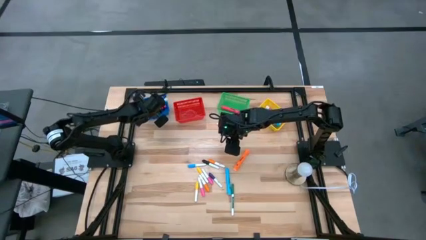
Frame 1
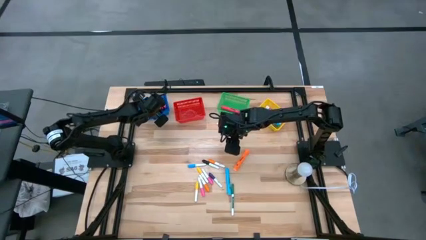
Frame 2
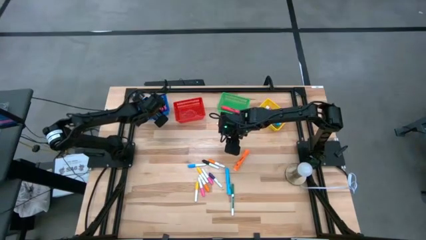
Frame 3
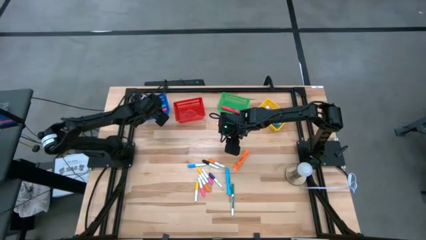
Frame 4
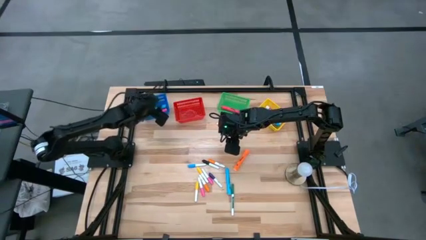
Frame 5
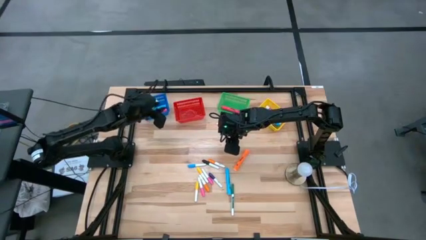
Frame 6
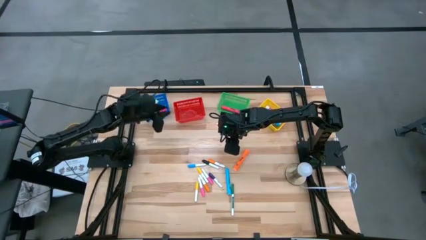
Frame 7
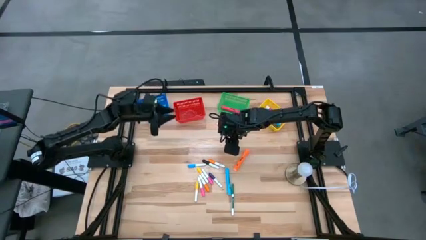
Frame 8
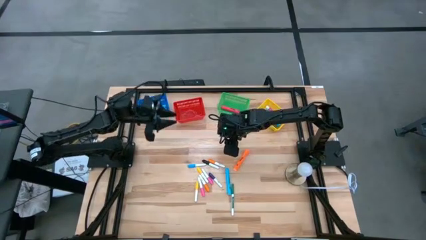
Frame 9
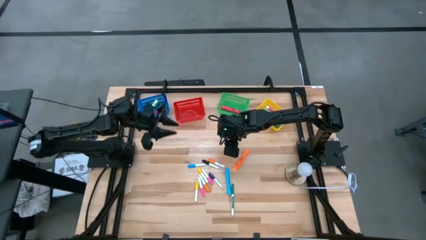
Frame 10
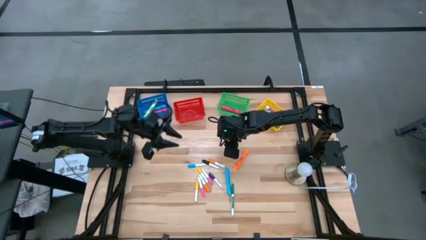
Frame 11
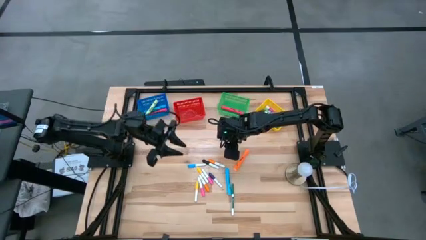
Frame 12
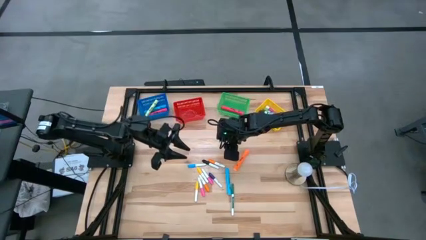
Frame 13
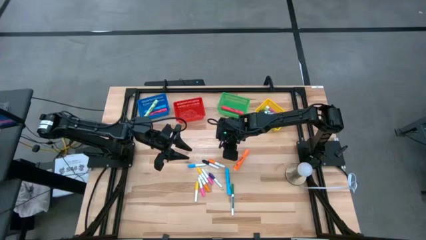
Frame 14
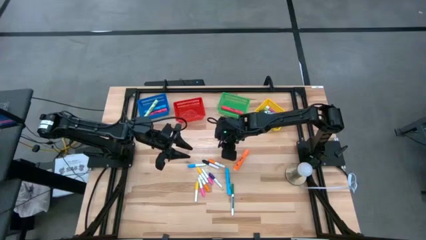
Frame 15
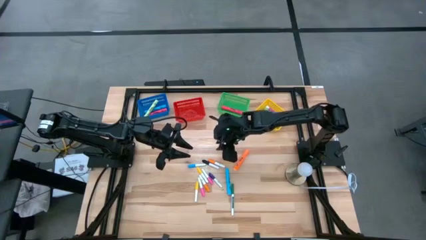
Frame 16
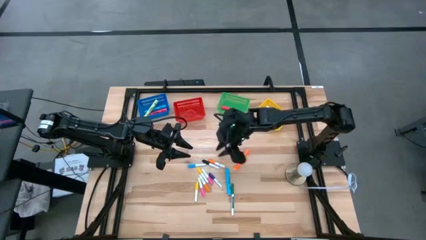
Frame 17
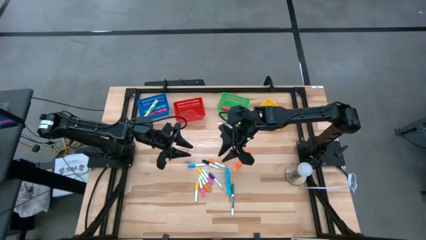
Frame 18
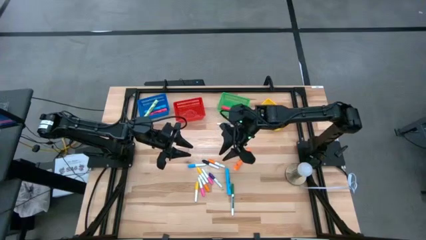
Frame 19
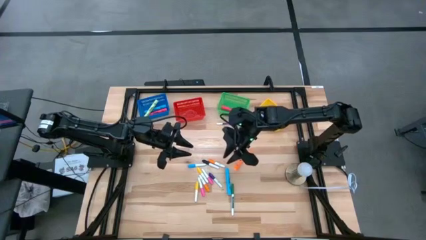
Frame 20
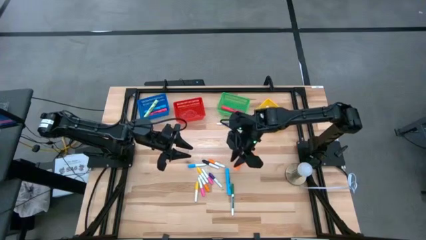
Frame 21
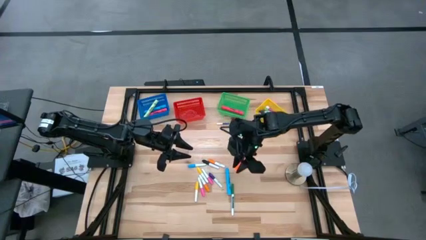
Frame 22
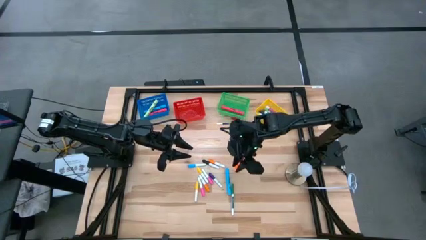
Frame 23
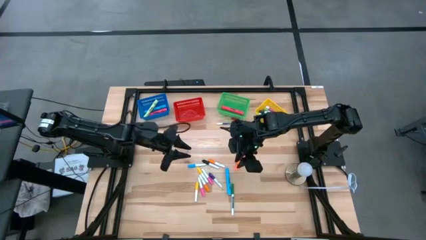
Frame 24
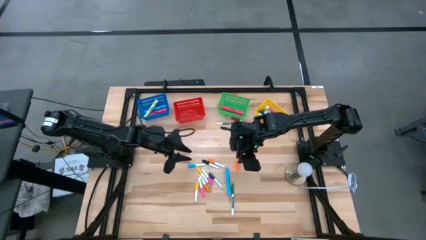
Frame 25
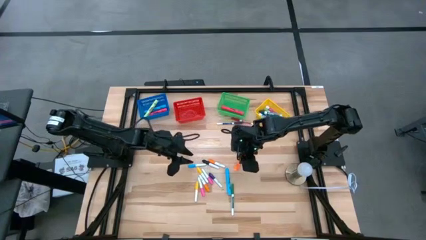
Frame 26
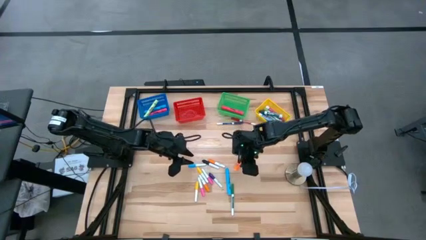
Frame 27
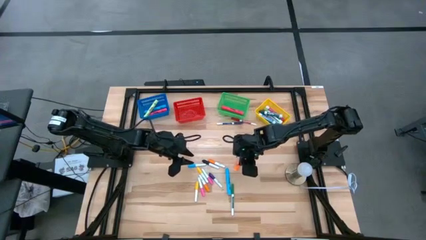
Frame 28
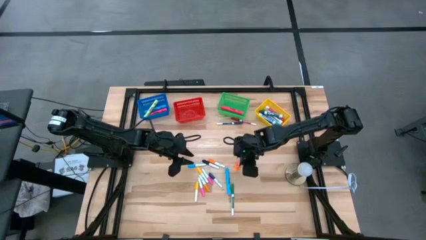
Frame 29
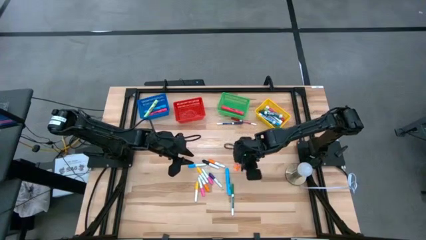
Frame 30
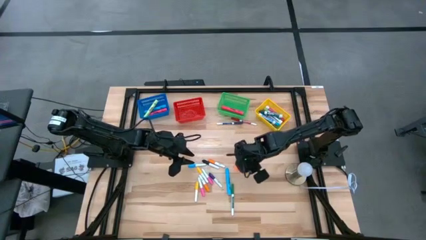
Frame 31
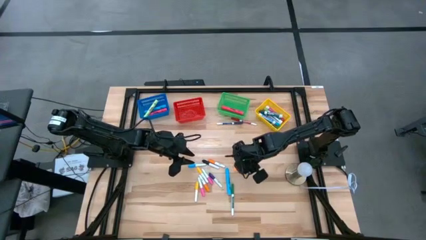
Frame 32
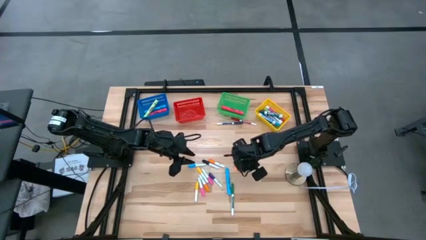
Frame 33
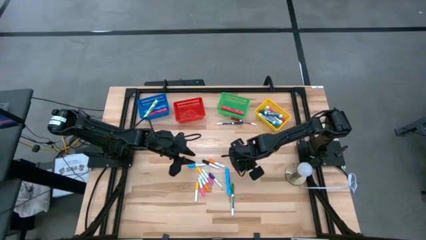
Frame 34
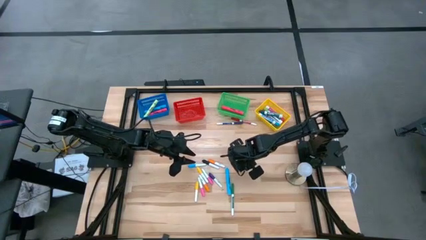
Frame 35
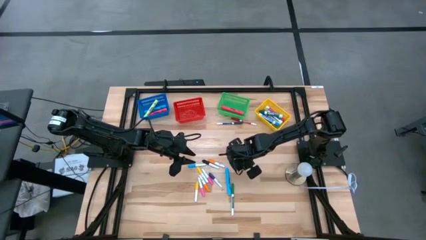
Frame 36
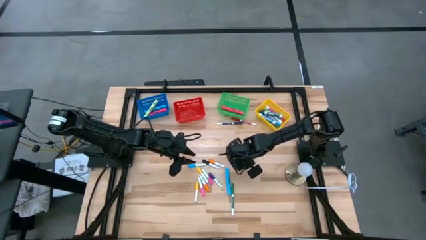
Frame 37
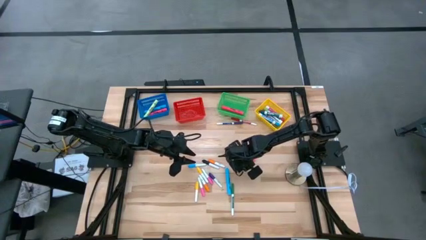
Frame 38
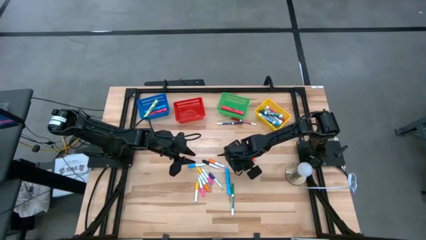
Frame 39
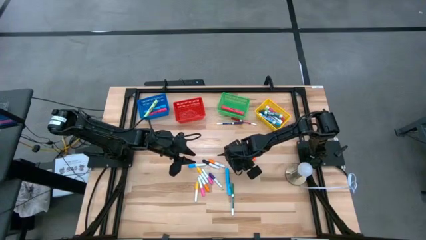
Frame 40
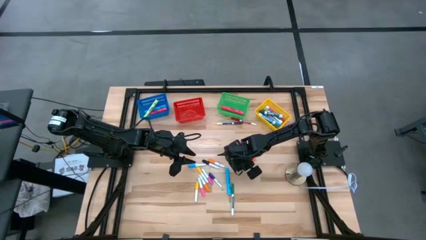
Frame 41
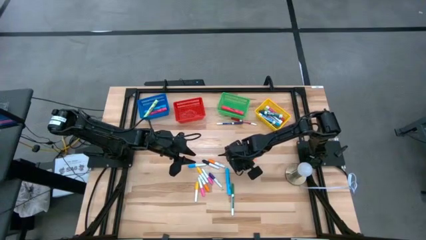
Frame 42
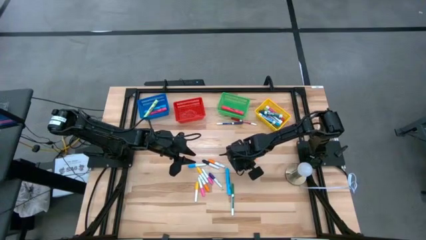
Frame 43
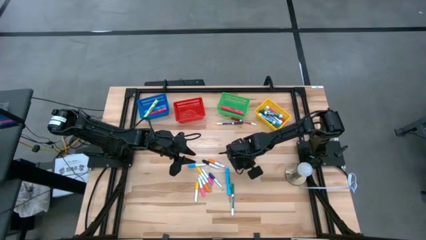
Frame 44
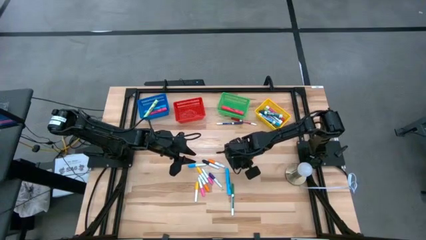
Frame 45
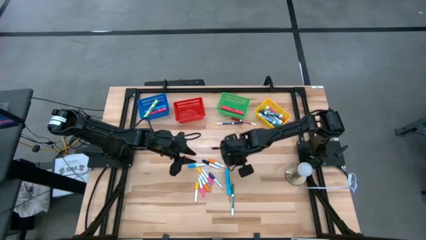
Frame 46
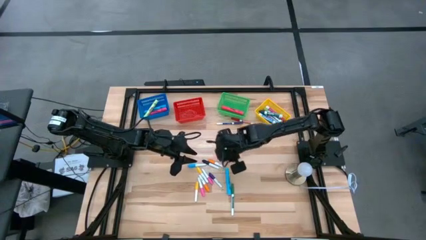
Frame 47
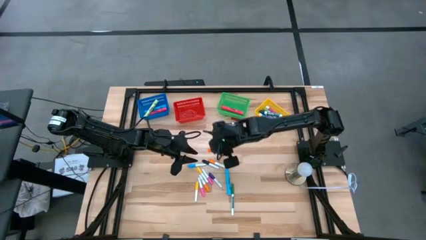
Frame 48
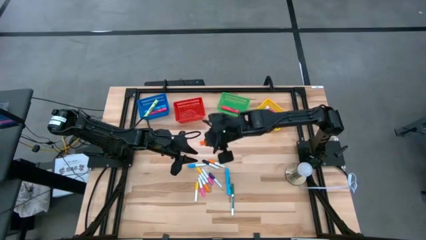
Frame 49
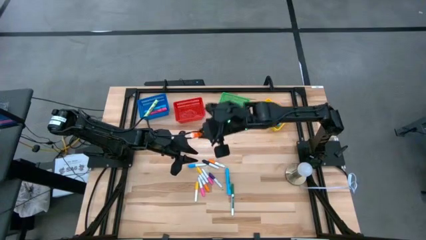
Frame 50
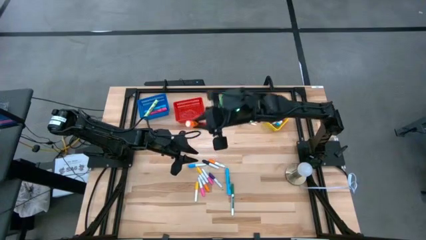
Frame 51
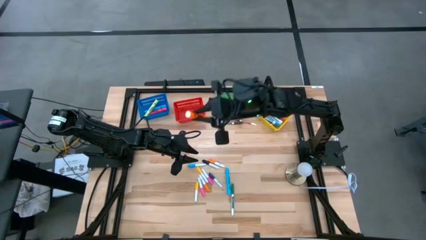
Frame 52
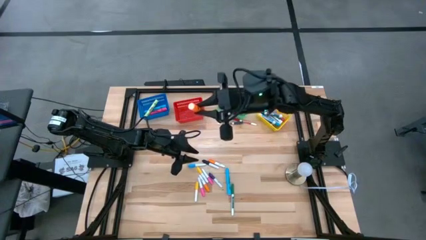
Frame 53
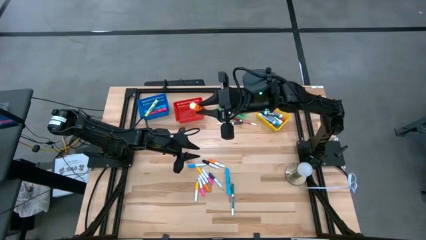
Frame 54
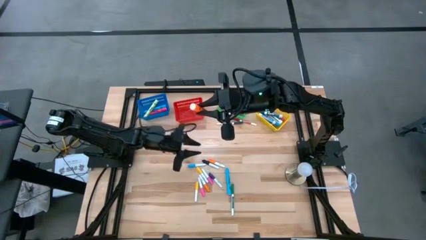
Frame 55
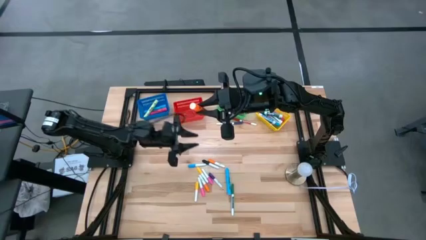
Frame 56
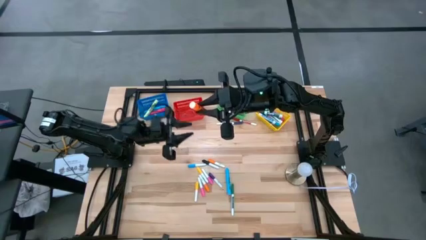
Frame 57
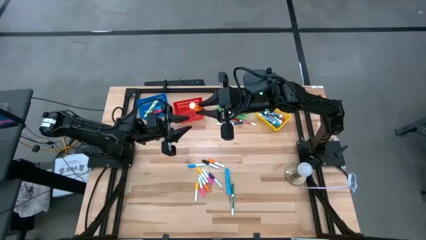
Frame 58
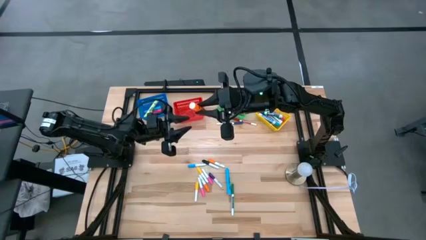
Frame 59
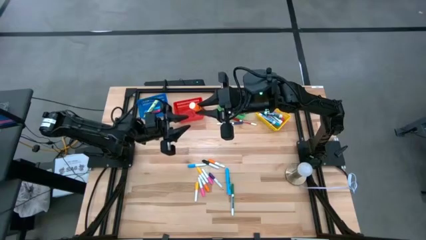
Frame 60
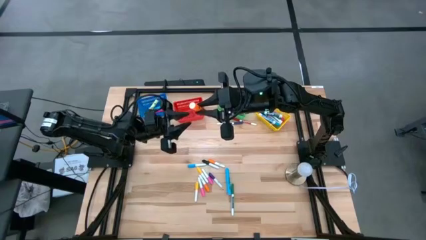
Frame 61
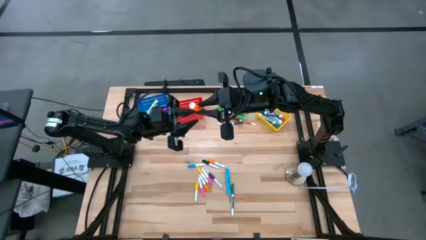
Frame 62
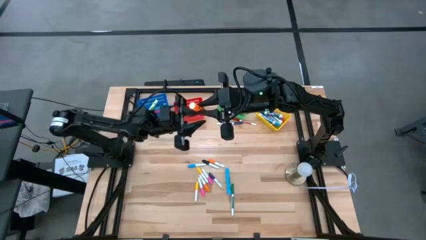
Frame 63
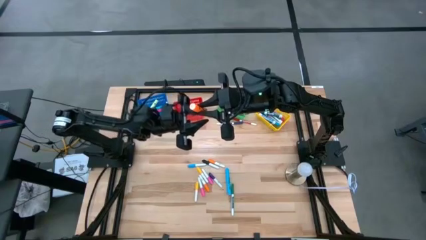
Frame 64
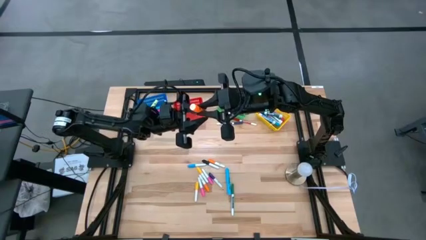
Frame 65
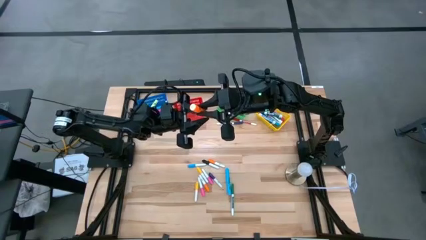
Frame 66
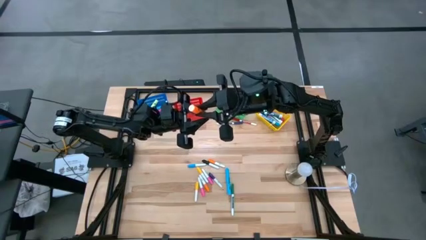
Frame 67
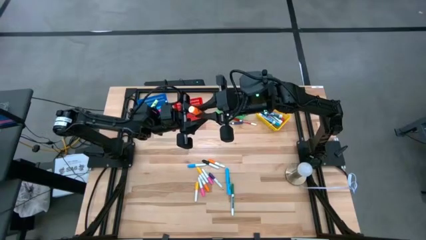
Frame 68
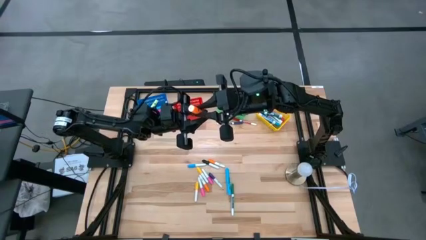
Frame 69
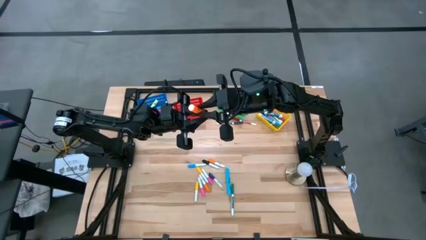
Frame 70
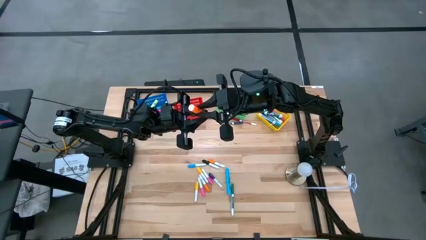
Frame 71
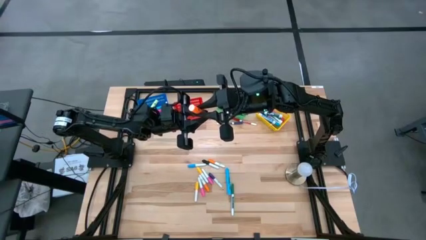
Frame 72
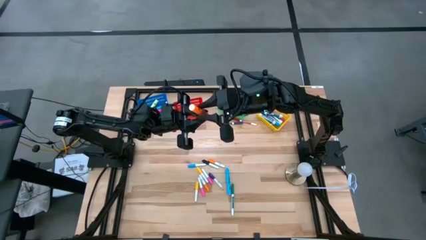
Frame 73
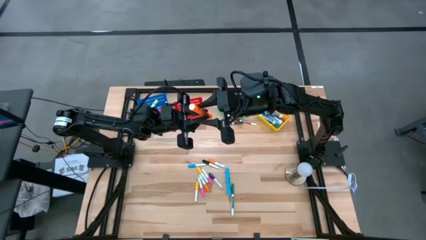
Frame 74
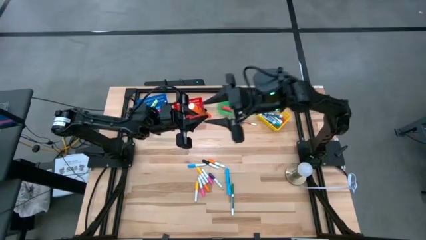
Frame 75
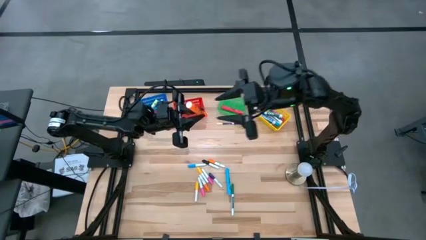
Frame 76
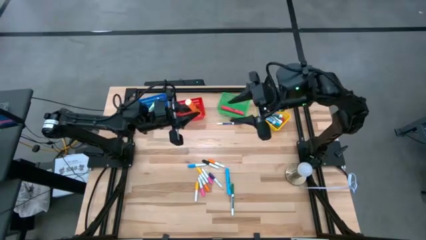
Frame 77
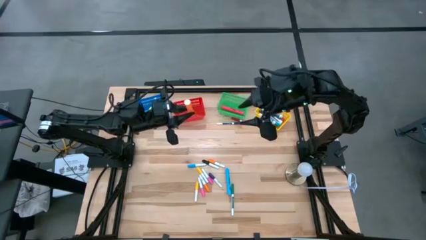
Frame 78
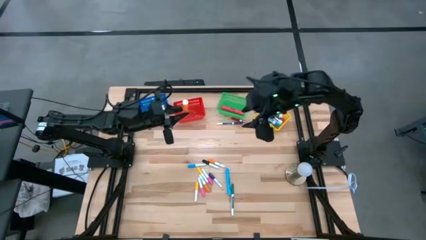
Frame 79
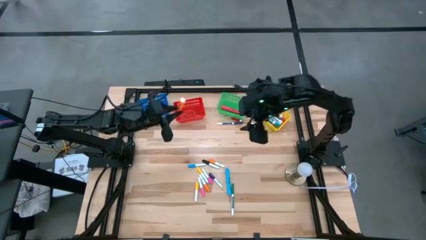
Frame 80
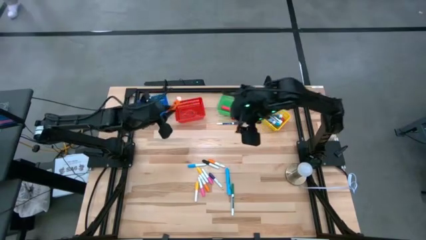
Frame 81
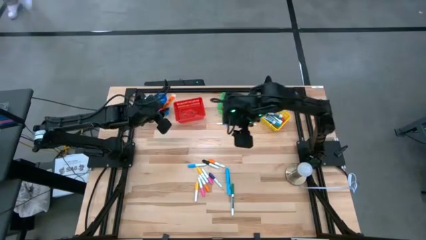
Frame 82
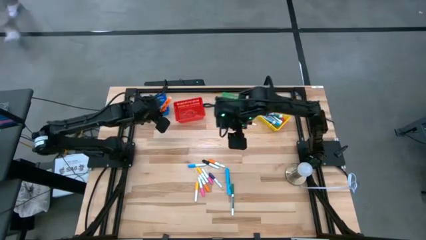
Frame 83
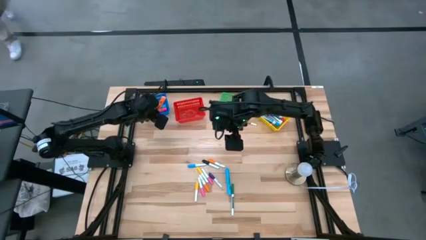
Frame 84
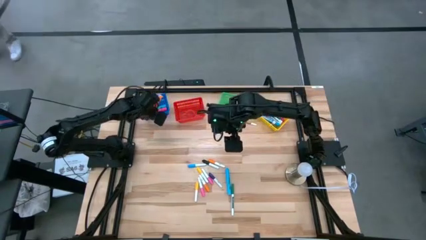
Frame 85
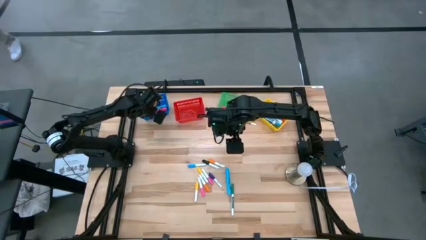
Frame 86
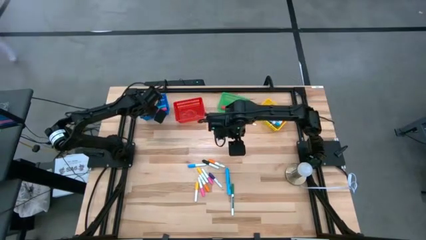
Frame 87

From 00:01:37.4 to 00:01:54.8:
Task: Pick & Place Markers
Put the large orange highlighter pen into the blue bin
